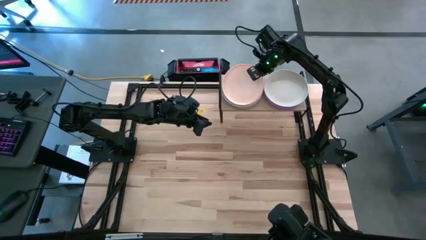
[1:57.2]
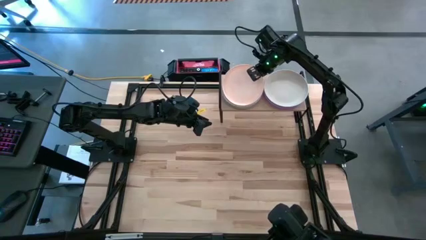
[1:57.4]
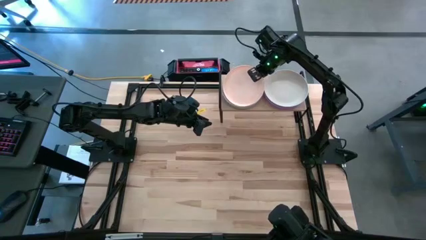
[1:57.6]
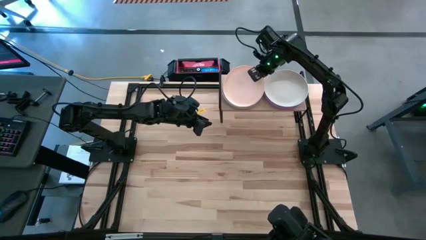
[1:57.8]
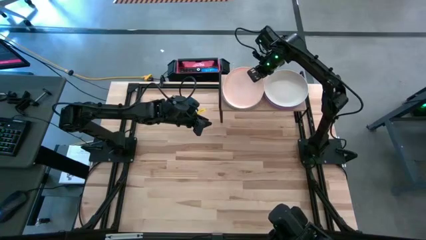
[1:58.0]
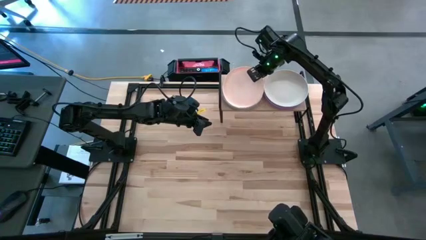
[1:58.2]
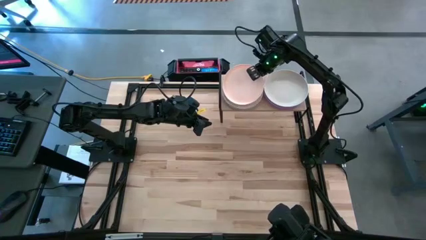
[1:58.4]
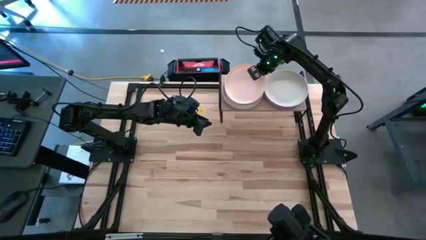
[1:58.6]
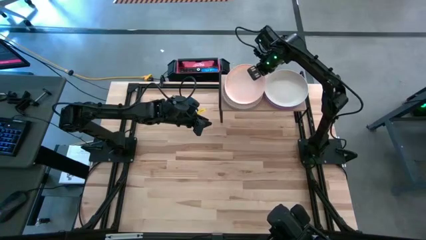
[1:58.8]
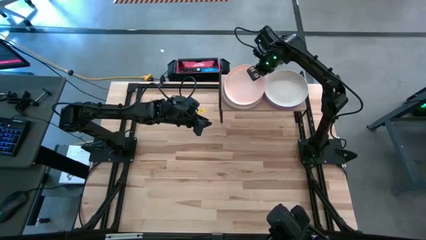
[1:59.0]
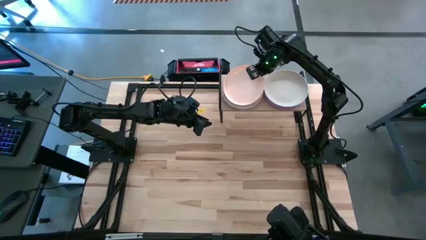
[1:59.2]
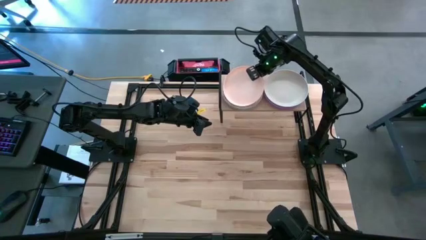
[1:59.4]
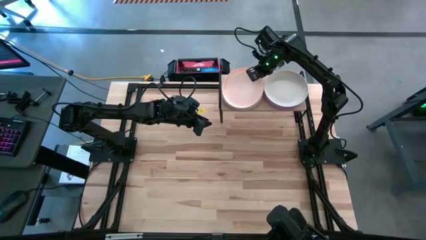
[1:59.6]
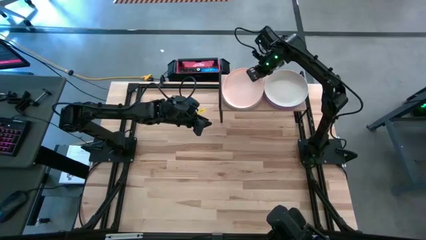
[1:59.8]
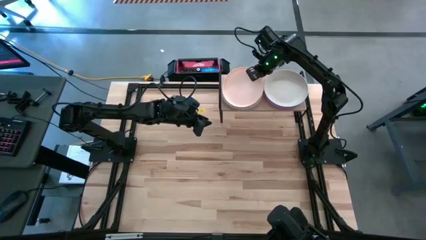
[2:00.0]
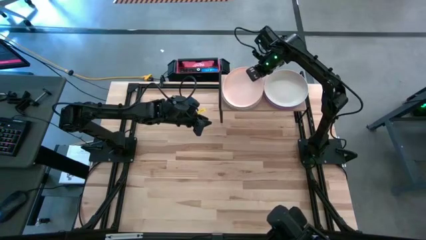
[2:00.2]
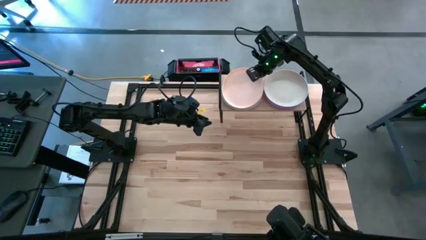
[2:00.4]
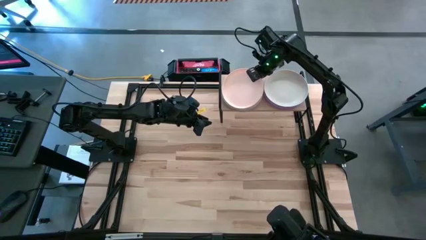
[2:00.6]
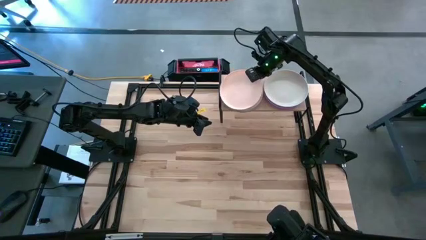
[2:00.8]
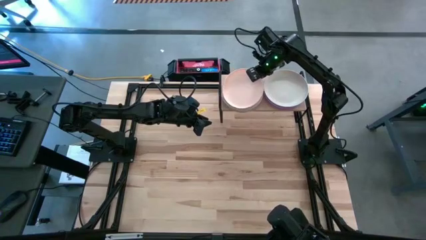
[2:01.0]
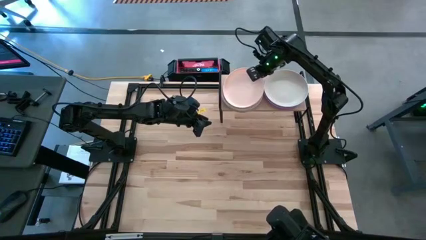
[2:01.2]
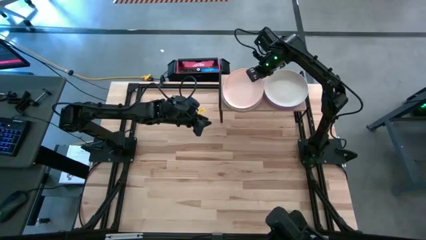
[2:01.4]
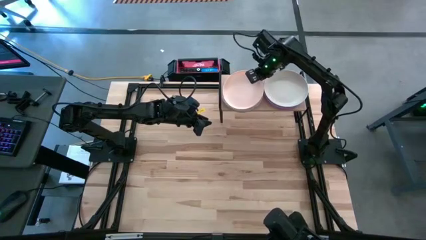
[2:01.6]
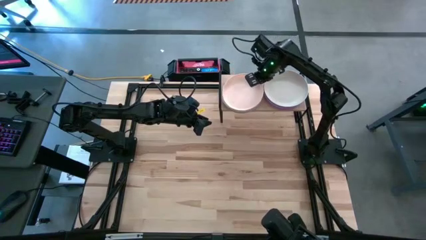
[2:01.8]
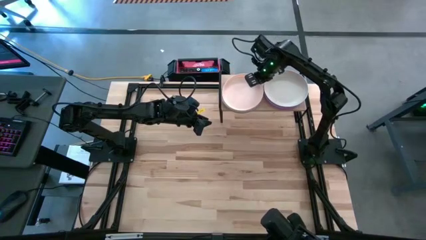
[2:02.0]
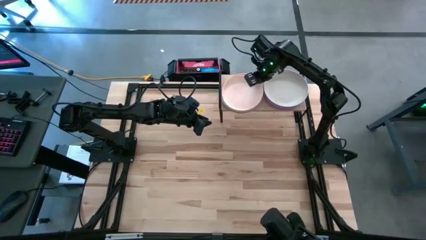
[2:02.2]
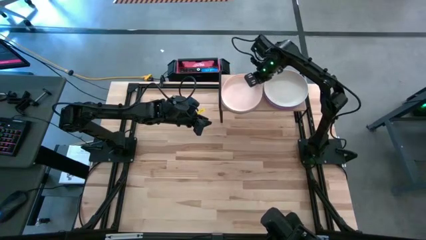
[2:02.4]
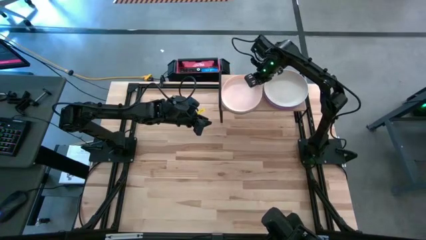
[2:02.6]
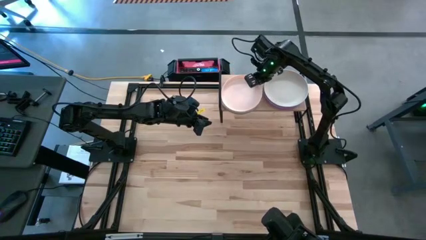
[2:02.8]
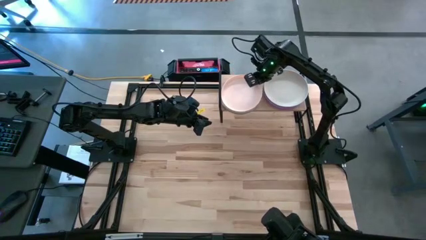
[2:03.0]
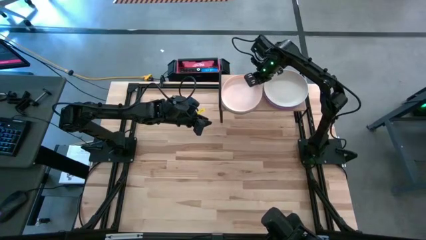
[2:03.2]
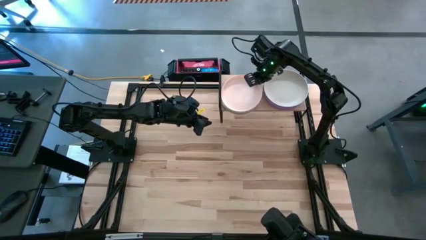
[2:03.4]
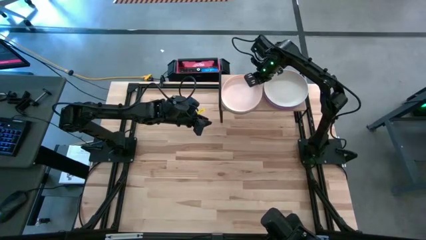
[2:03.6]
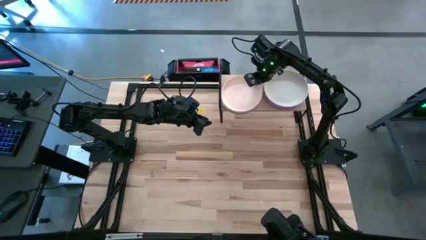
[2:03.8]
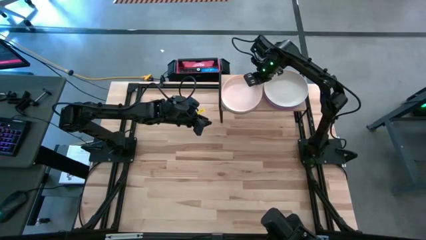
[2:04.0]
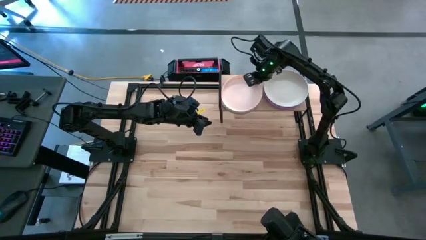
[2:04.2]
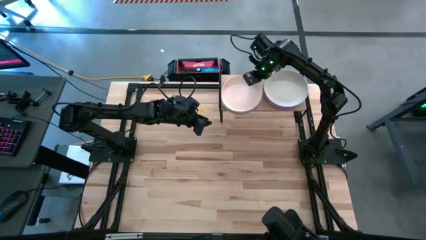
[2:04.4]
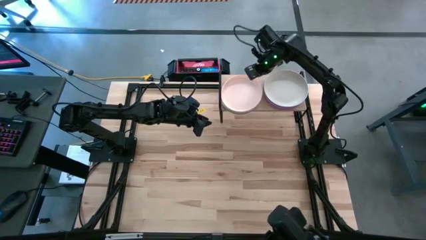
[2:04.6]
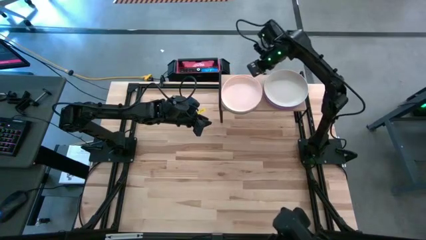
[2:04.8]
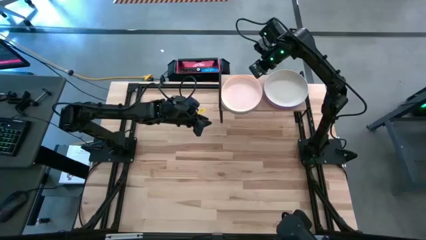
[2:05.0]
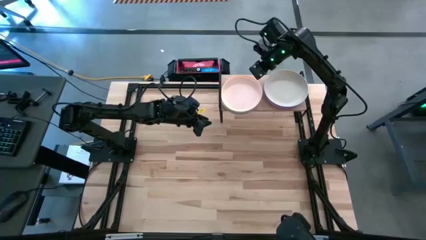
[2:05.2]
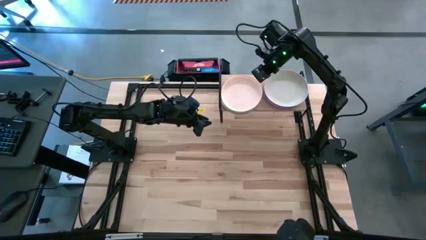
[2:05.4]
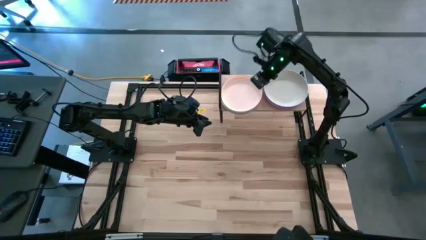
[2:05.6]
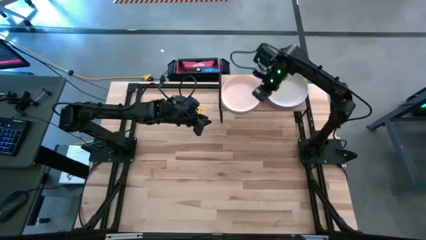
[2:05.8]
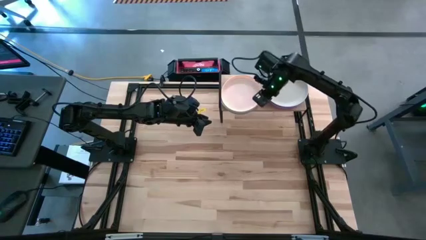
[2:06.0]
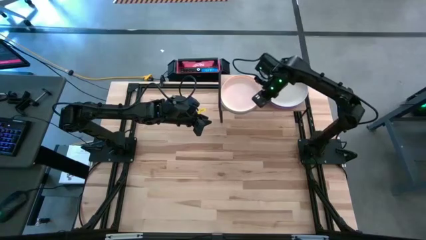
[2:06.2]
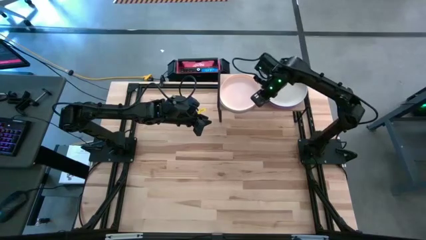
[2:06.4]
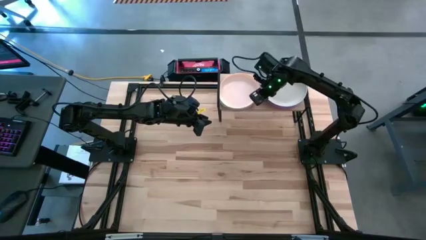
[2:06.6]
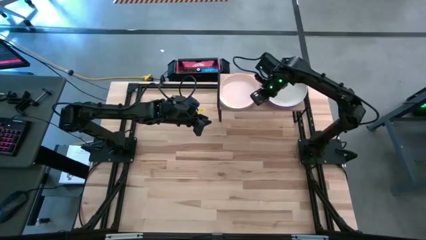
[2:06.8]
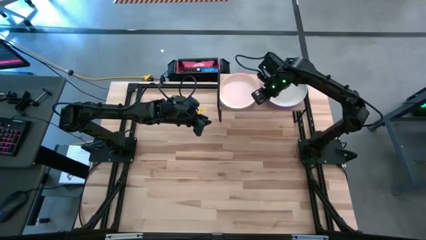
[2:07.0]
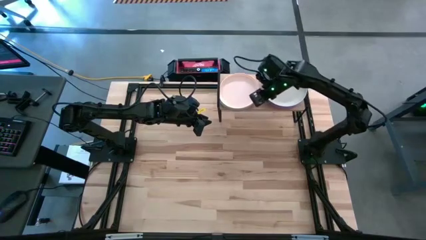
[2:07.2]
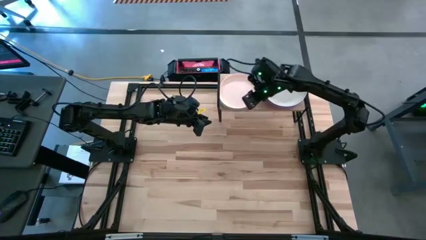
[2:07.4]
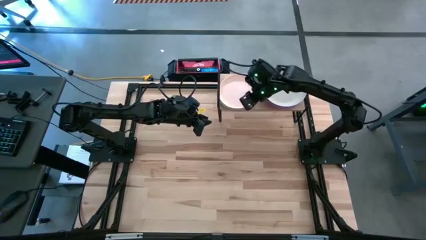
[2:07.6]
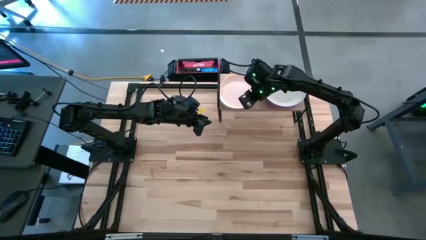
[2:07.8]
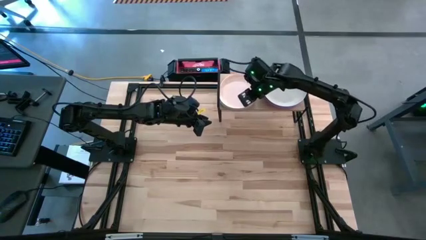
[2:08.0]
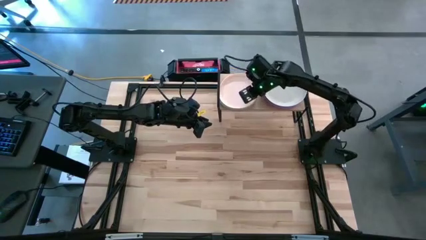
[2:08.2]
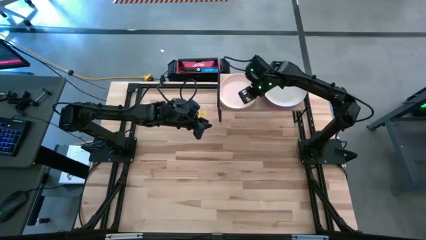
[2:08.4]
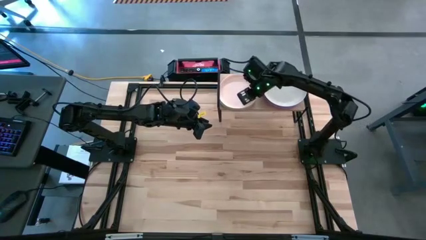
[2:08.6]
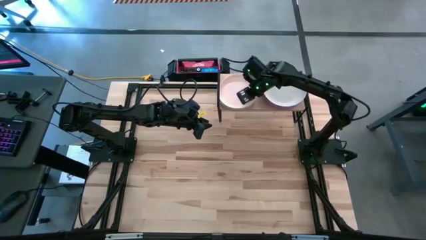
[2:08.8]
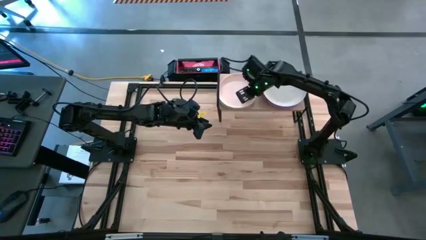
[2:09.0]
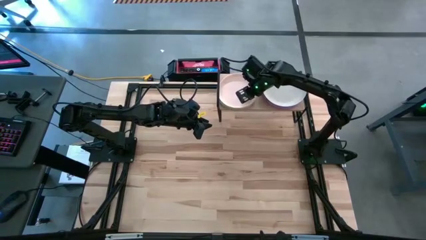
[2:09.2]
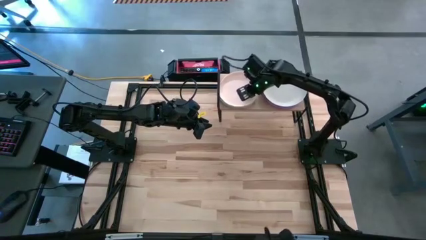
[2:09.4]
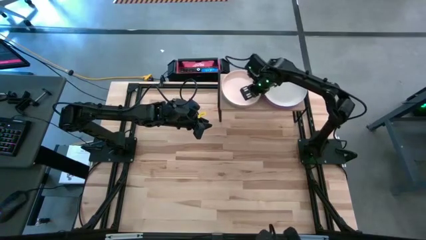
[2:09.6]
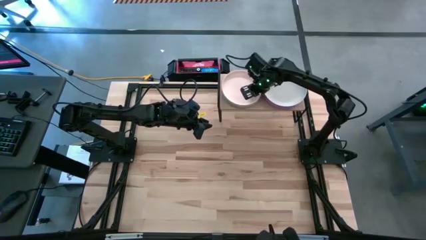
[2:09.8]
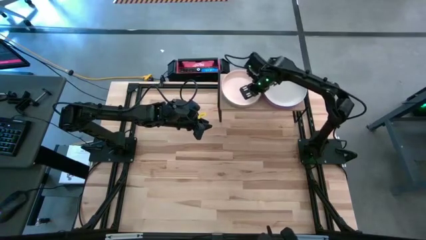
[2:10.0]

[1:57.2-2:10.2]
Task: Place and stack plates onto a shelf
Stack the light pink plate on top of the gray plate on the shelf

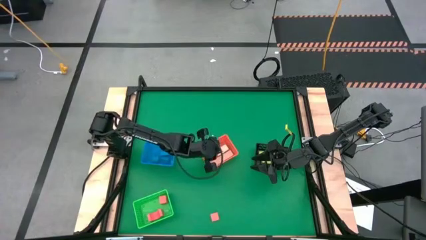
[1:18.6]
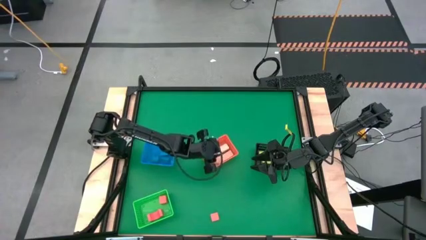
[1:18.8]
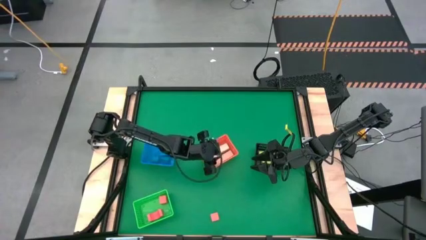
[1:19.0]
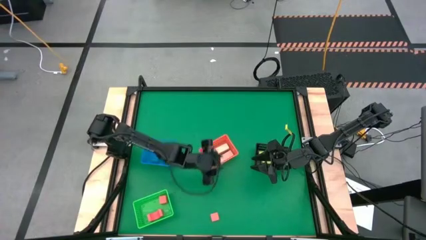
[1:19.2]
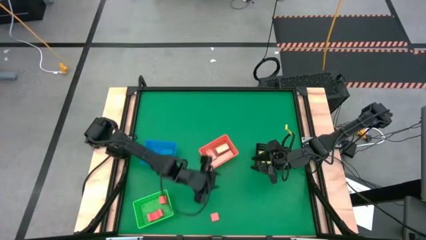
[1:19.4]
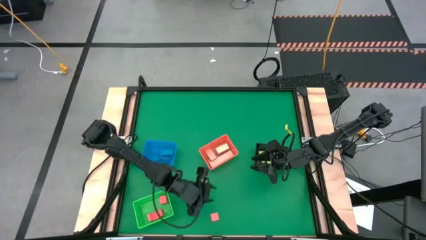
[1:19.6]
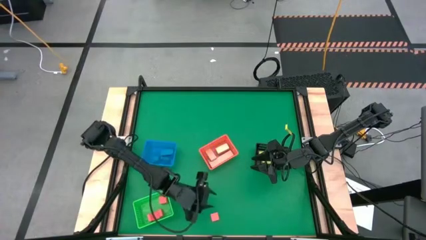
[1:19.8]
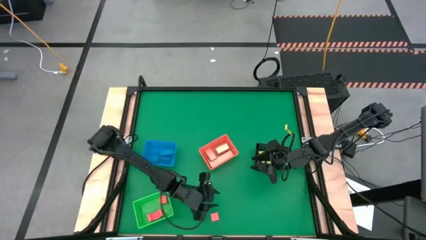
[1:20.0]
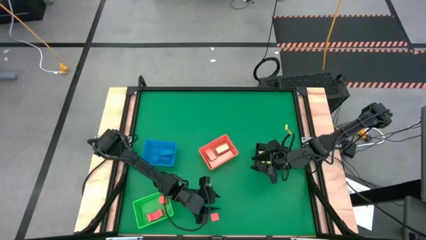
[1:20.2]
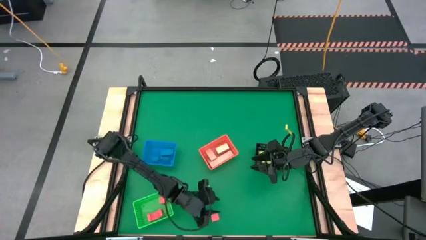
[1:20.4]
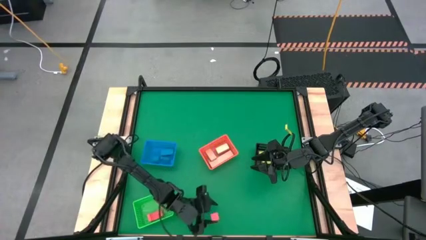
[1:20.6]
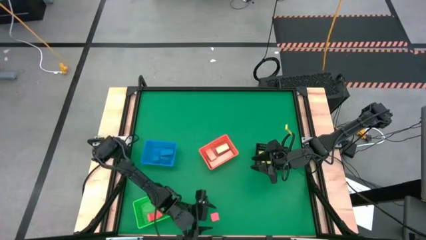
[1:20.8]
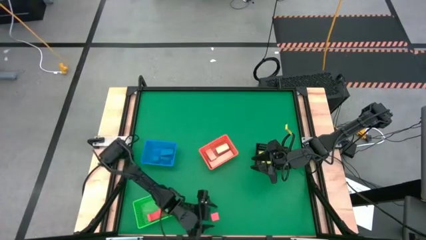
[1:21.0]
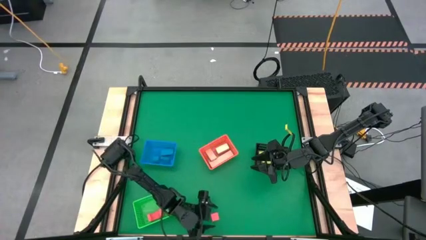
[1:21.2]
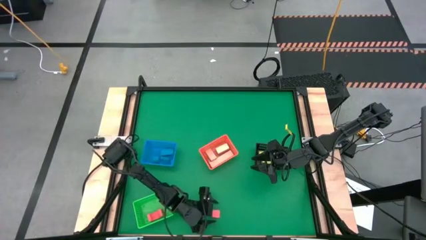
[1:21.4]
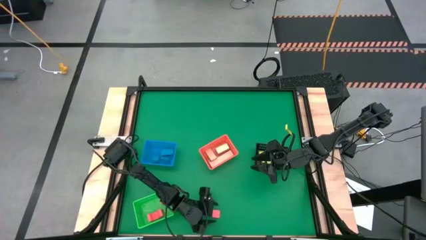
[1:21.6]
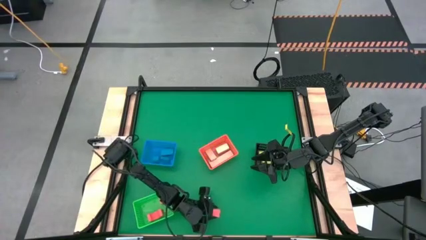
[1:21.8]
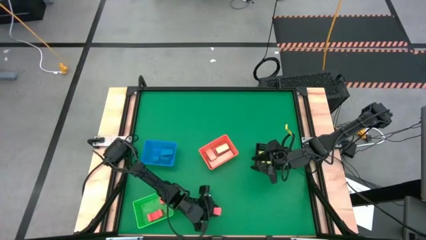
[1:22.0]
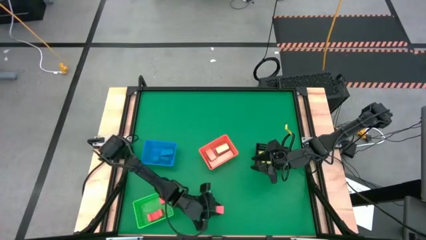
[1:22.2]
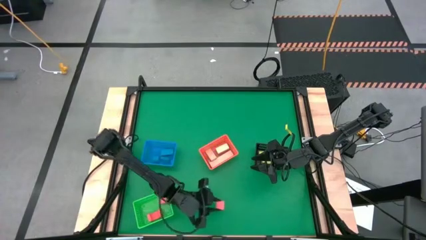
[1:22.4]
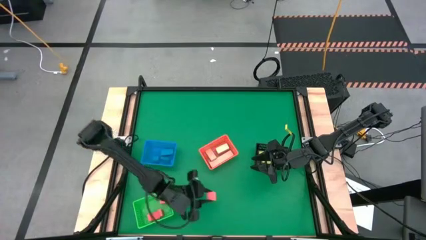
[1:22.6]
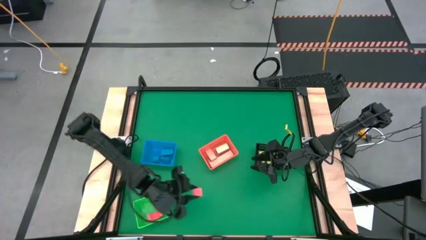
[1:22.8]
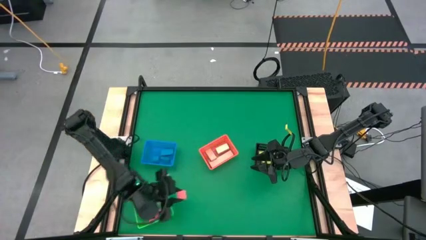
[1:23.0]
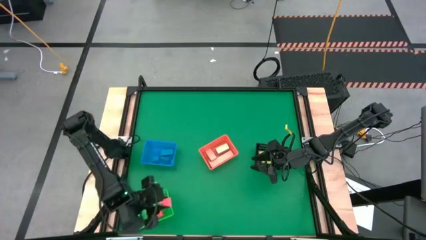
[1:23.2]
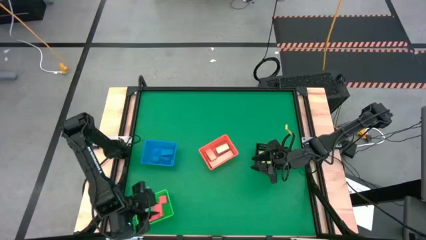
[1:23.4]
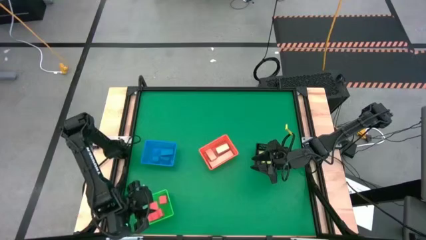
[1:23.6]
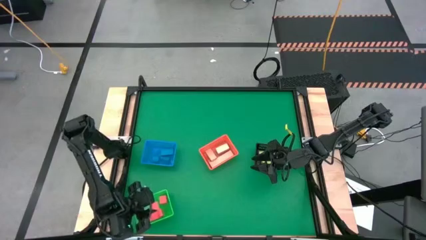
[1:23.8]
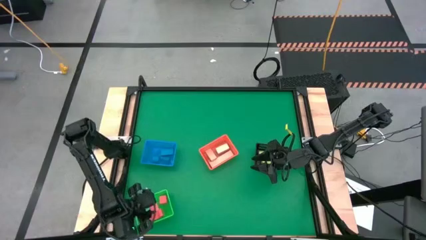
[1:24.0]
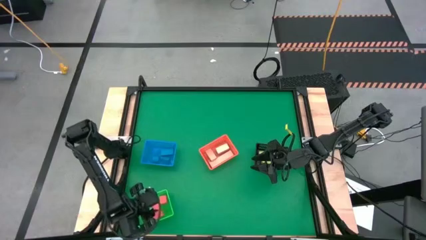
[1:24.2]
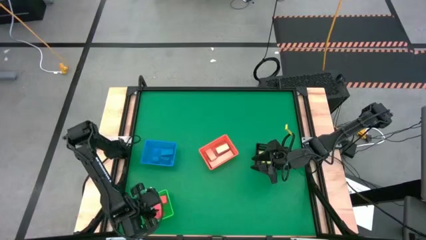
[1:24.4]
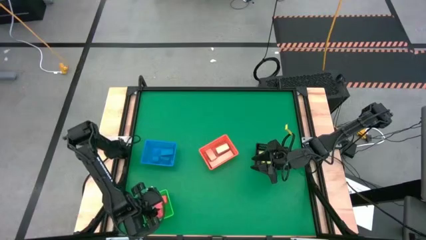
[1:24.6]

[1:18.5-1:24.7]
Task: Sort & place blocks by color
Put the orange block into the green bin
